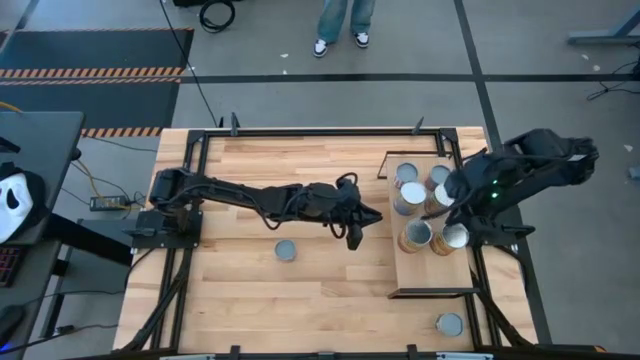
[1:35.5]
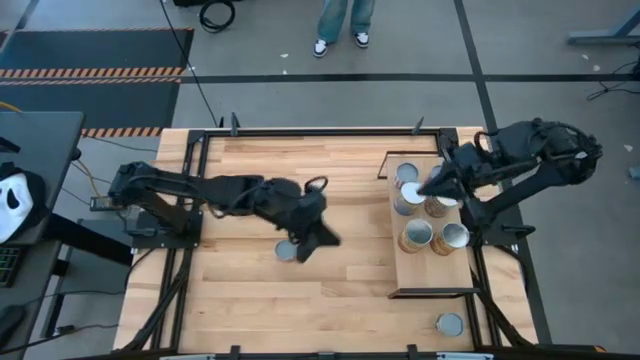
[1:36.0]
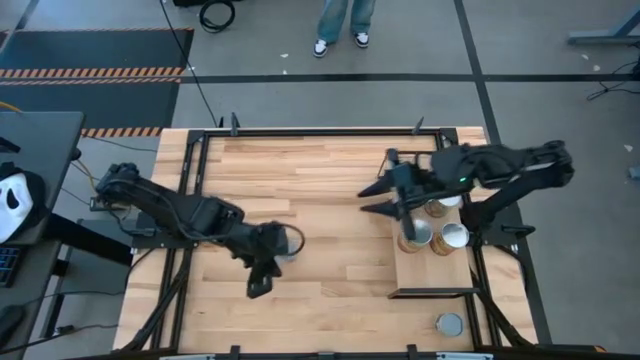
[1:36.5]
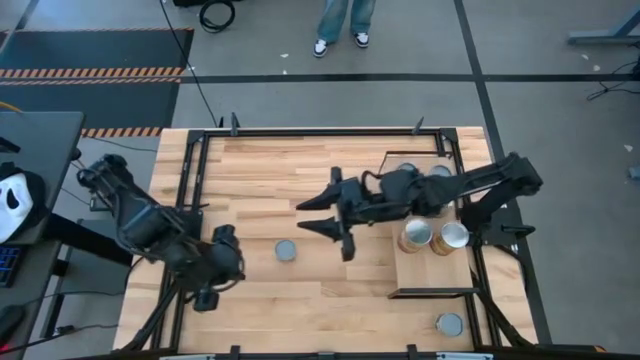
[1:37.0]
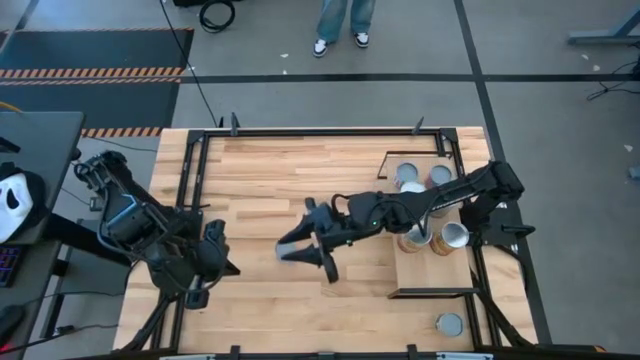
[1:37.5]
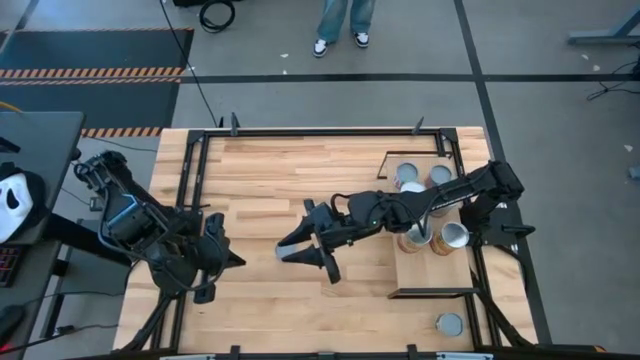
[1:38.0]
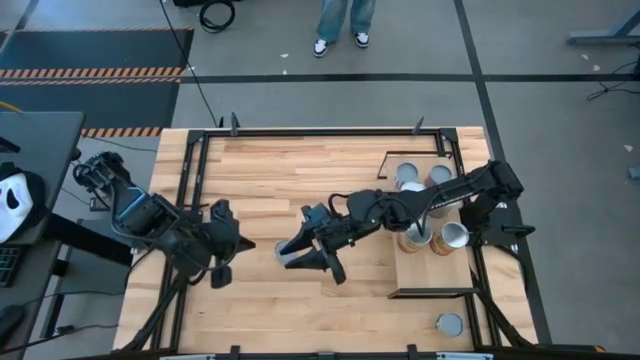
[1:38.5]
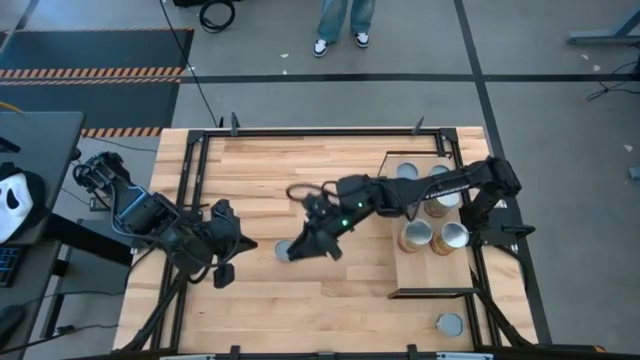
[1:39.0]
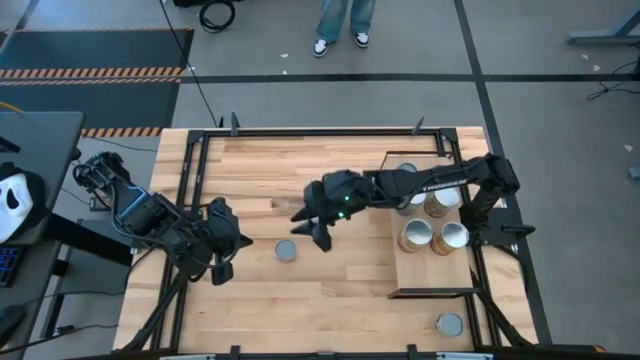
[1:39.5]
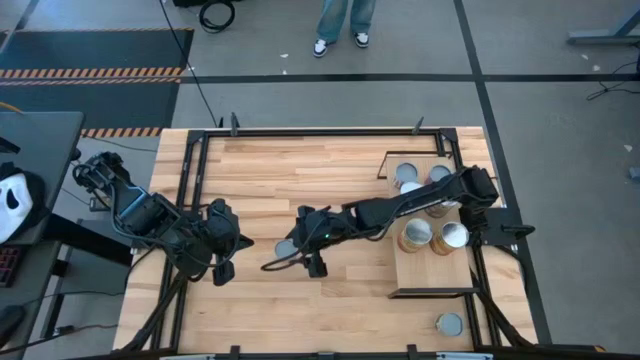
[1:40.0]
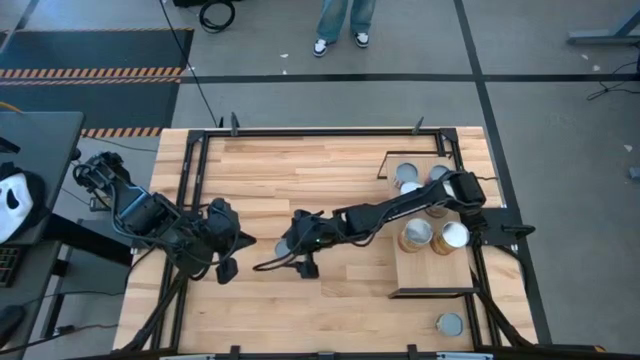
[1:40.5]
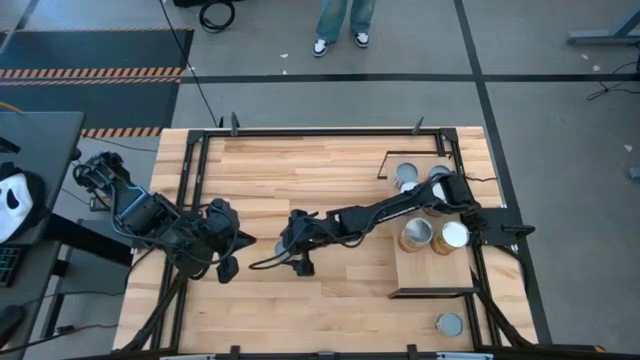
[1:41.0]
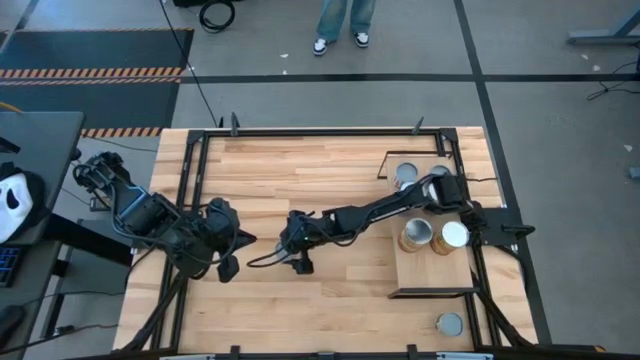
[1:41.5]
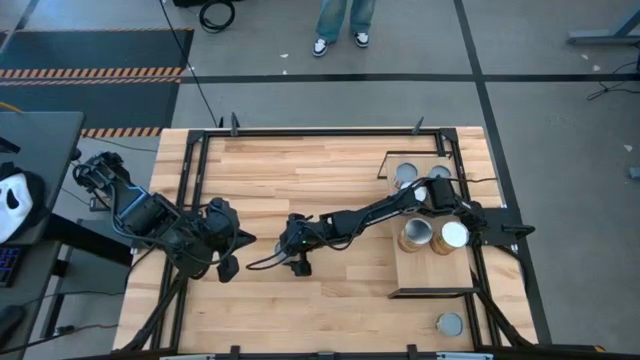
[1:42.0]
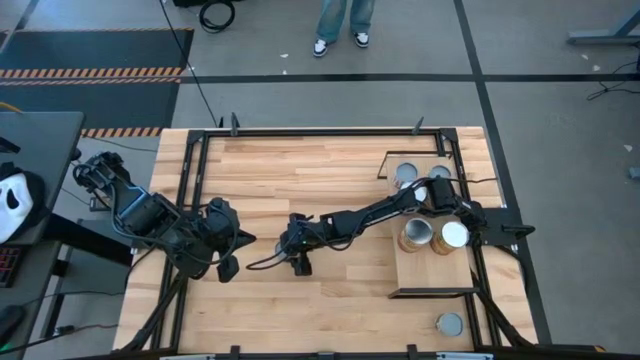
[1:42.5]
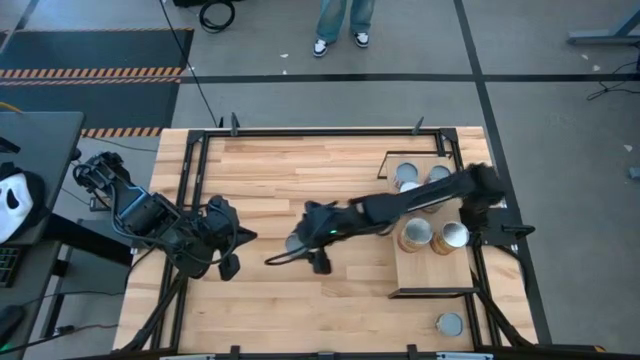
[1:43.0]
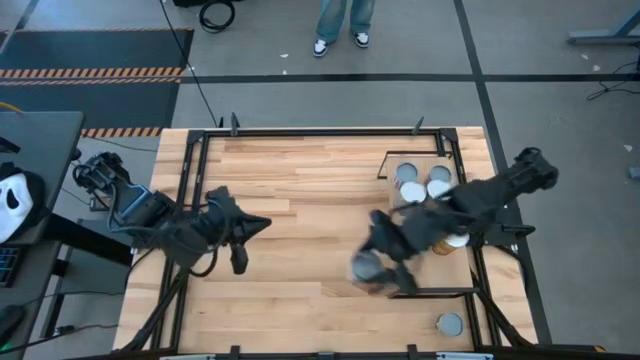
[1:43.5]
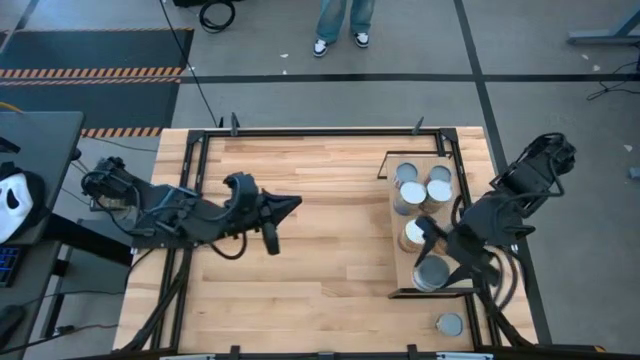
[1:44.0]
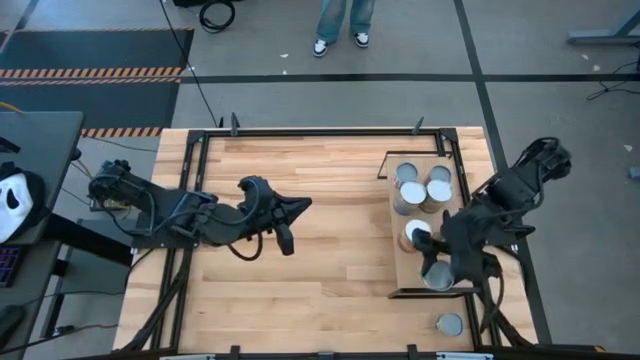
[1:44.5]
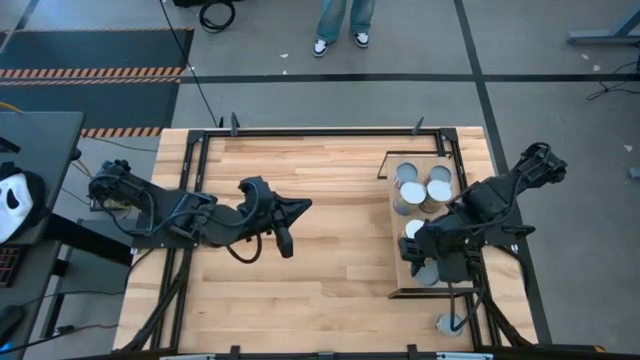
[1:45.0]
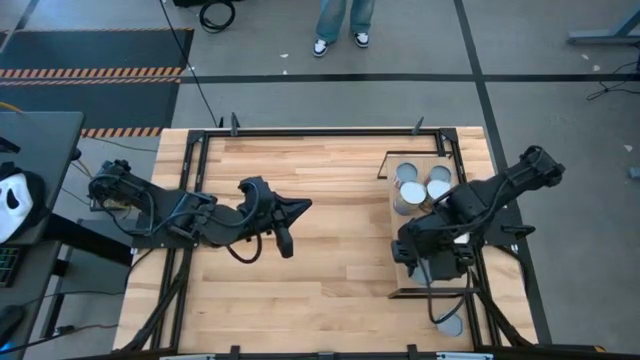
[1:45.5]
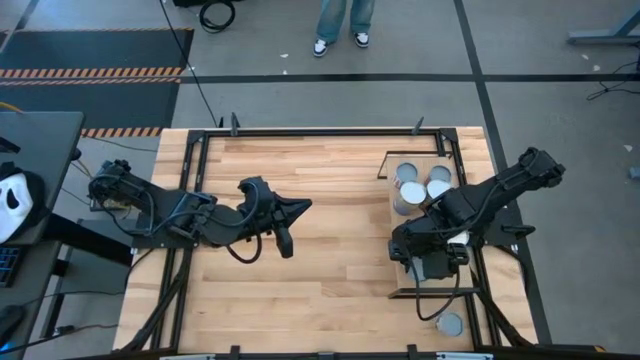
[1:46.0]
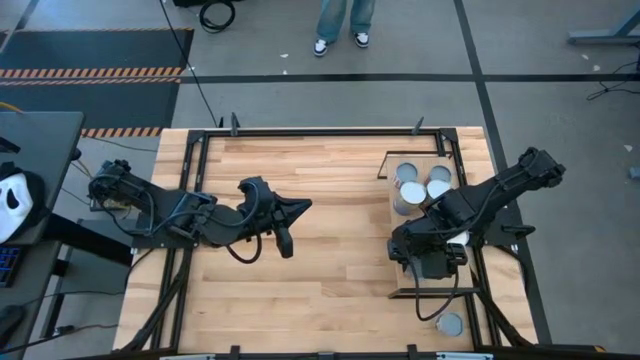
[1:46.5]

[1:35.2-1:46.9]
Task: Pick and place cans onto a shelf
Put the small canned oranges on the shelf

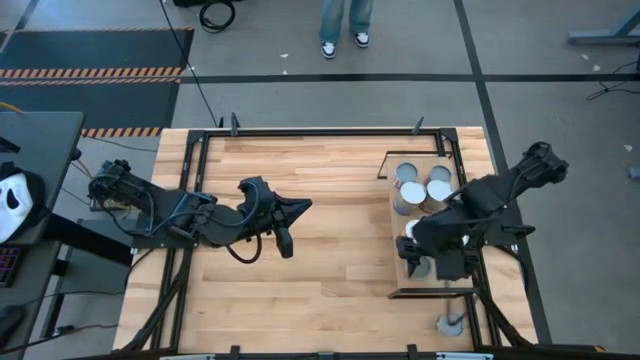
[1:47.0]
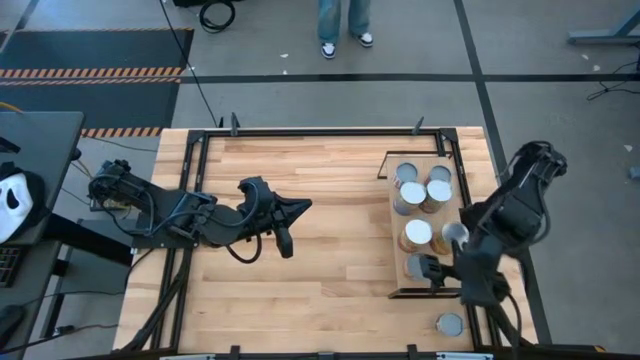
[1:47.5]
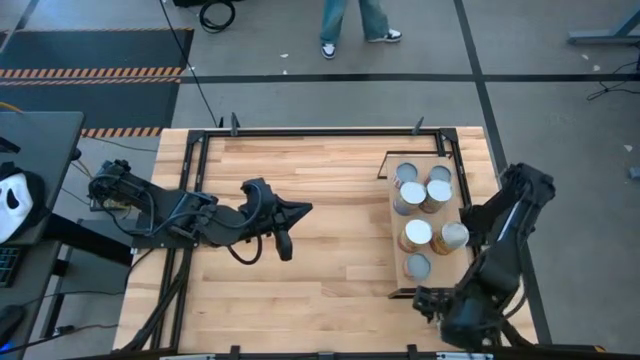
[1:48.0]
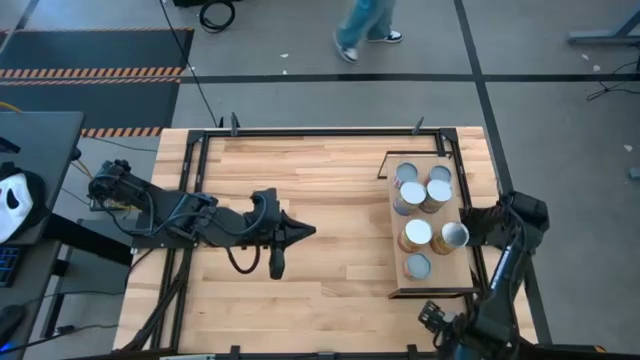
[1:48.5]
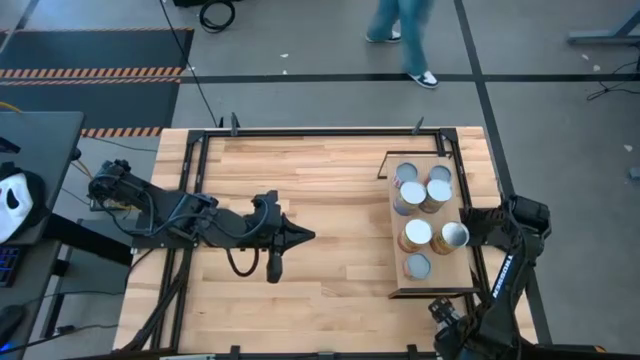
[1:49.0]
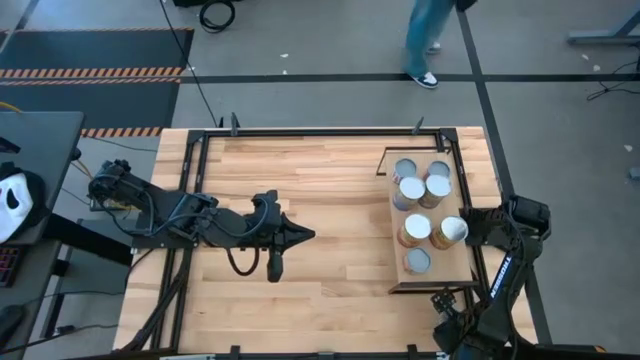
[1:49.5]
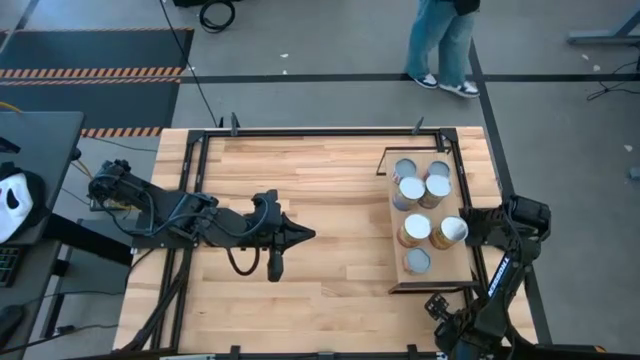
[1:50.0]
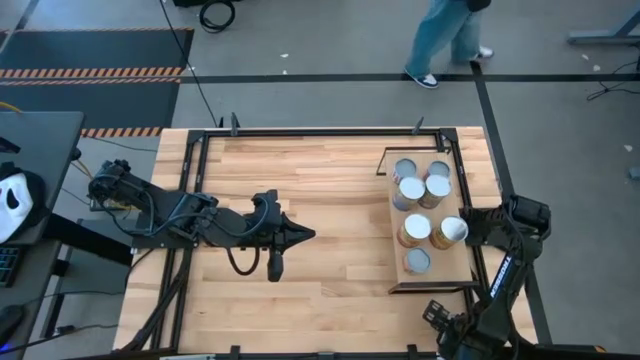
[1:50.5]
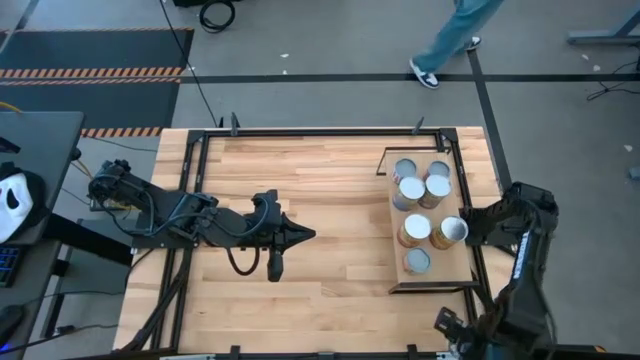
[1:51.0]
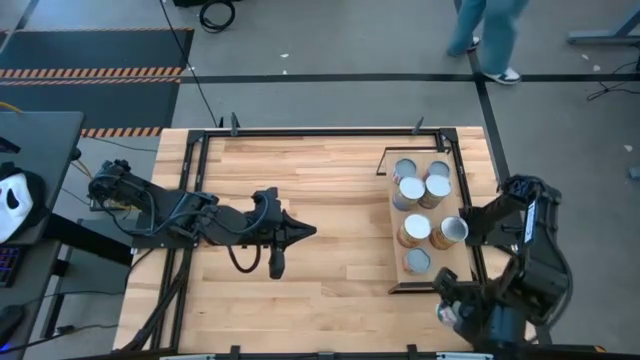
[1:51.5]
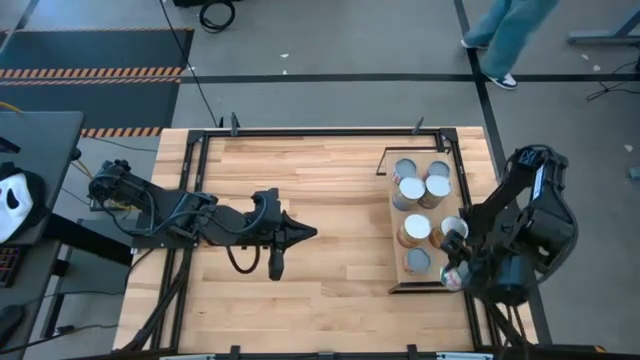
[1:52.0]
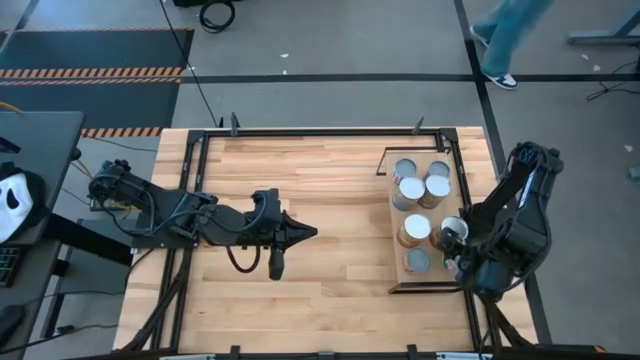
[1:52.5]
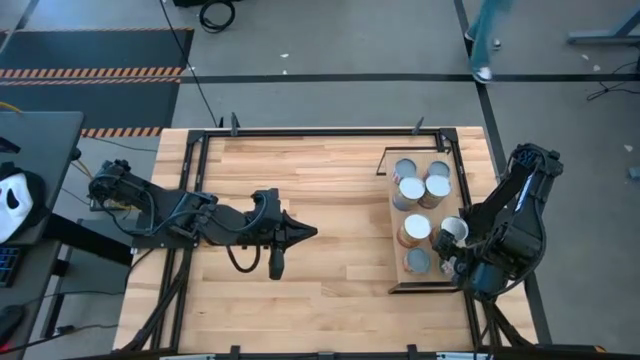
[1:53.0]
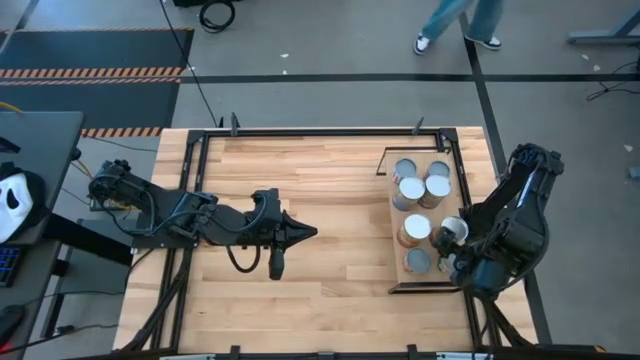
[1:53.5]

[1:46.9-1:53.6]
Put the canned green peas on the shelf

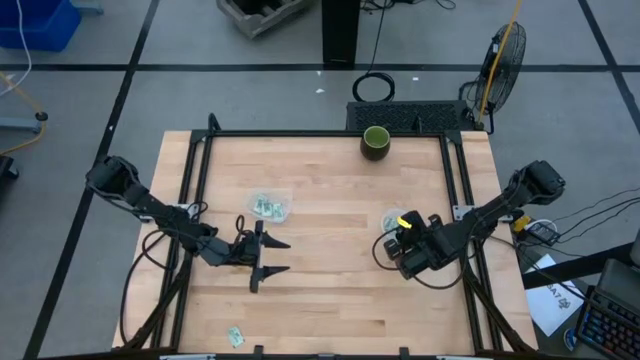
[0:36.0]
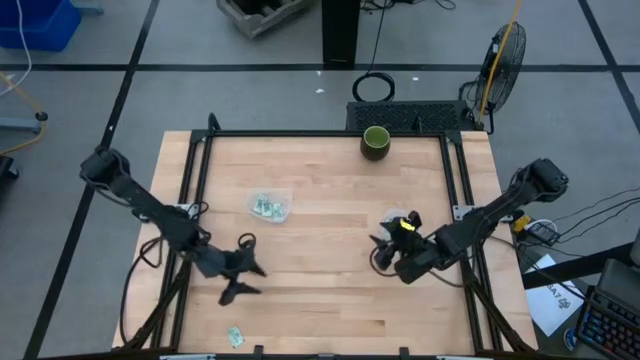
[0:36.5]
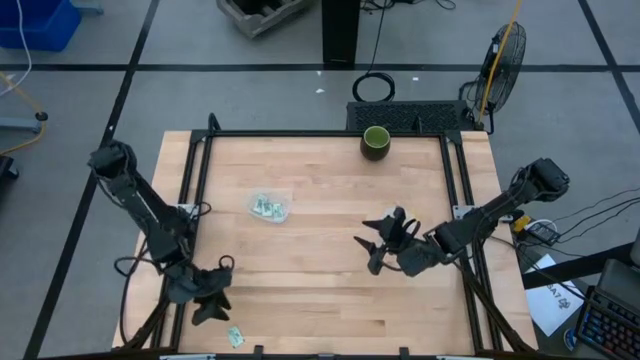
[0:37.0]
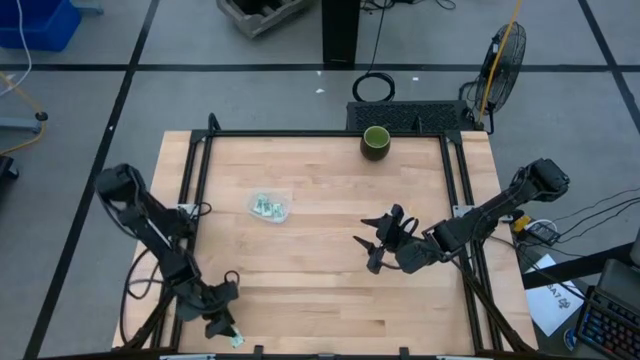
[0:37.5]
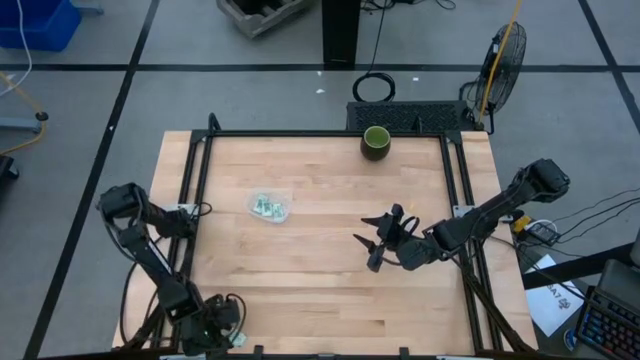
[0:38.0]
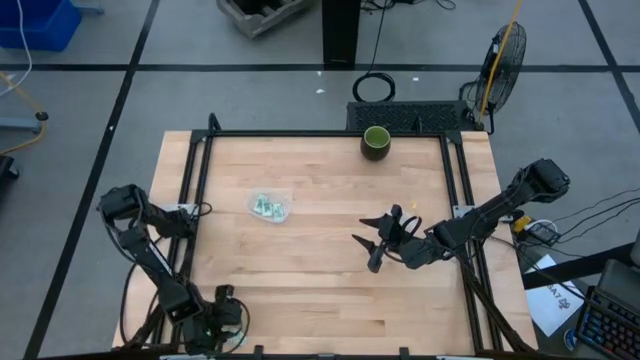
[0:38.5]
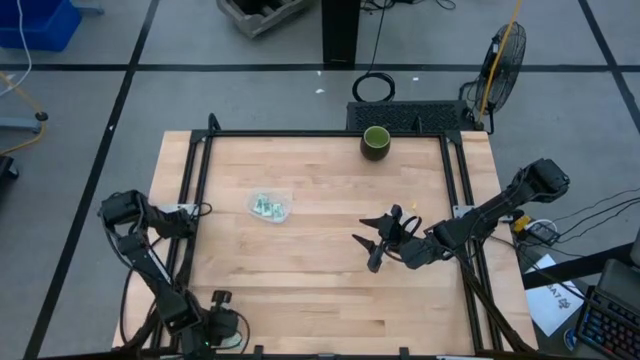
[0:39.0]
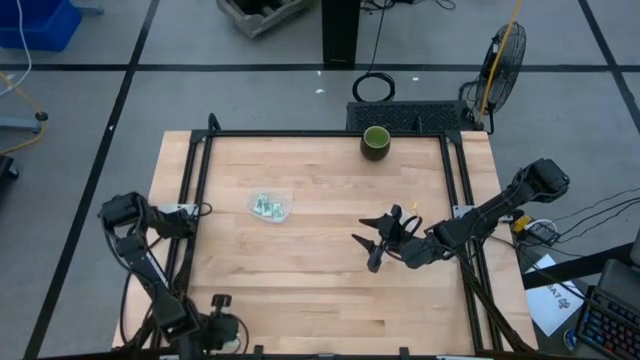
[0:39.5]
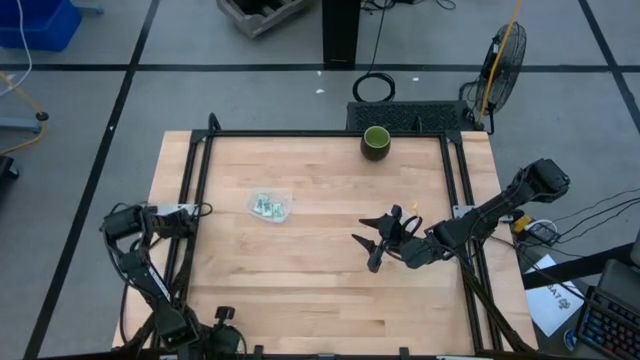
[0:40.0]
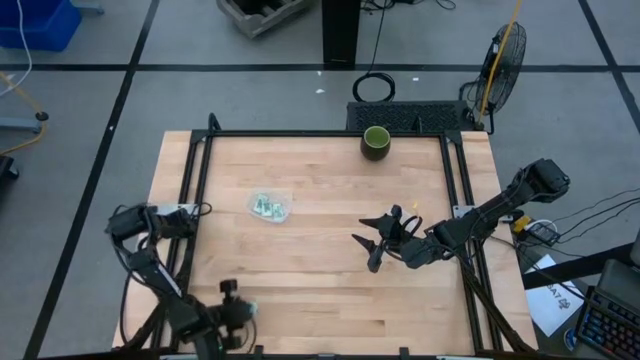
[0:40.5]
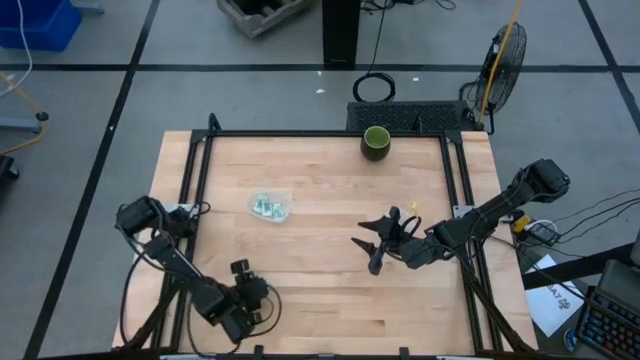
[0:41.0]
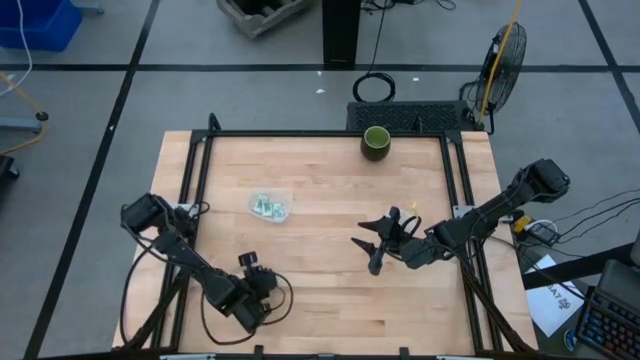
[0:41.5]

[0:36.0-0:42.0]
Task: Pick and place Stevia / Truvia into bins
Put the white stevia packet into the transparent rectangular container
